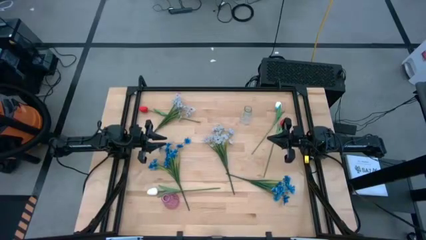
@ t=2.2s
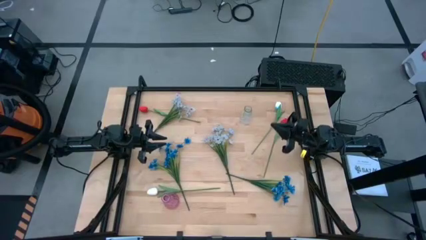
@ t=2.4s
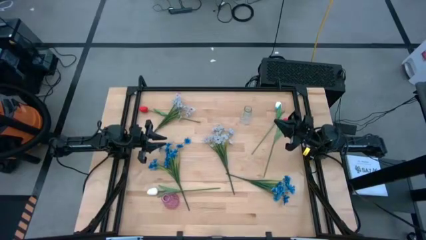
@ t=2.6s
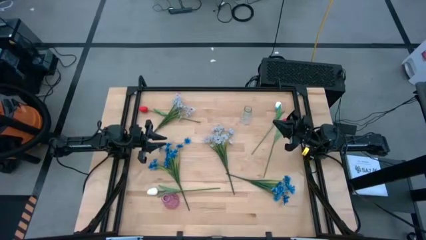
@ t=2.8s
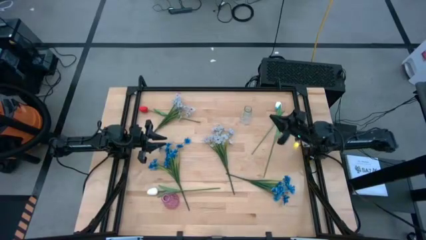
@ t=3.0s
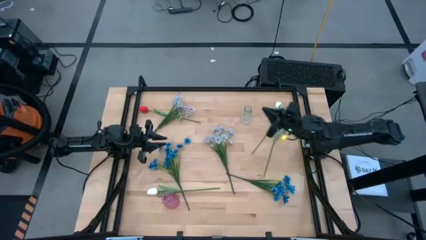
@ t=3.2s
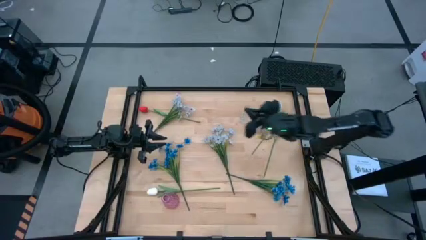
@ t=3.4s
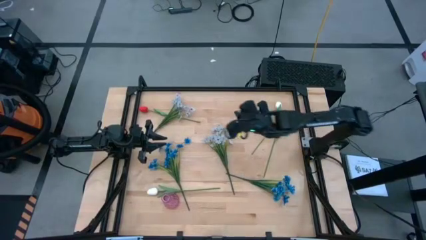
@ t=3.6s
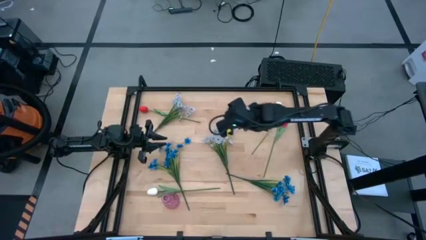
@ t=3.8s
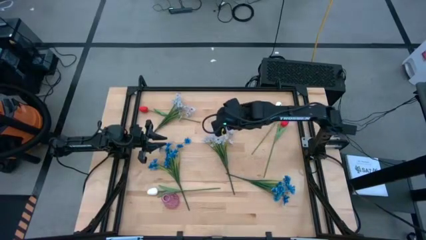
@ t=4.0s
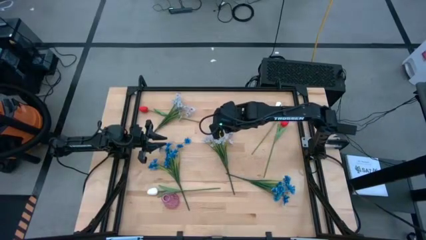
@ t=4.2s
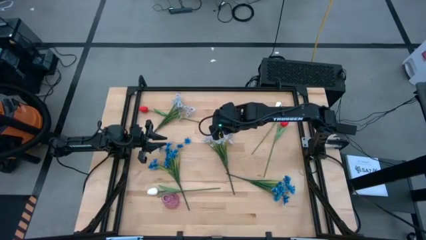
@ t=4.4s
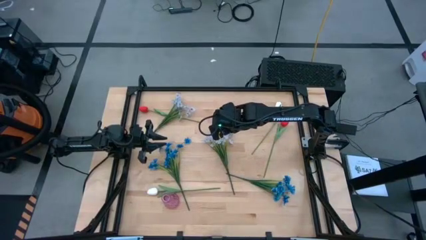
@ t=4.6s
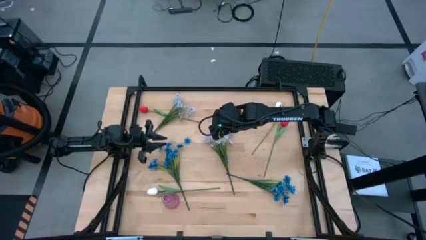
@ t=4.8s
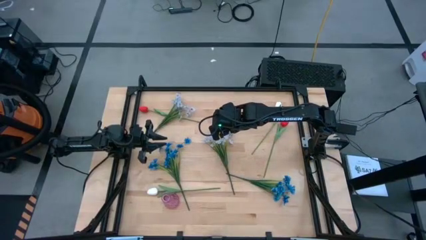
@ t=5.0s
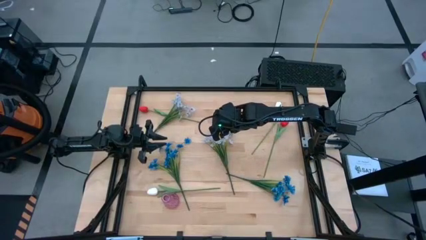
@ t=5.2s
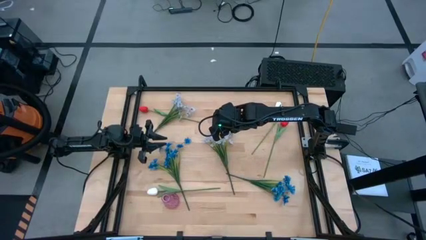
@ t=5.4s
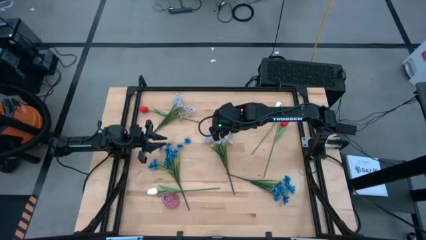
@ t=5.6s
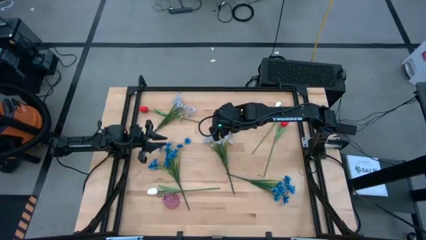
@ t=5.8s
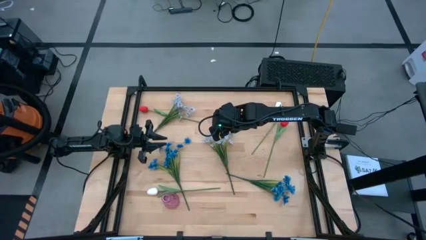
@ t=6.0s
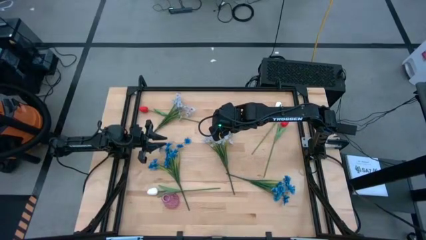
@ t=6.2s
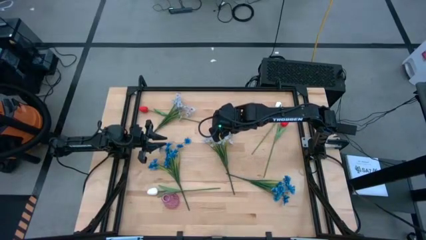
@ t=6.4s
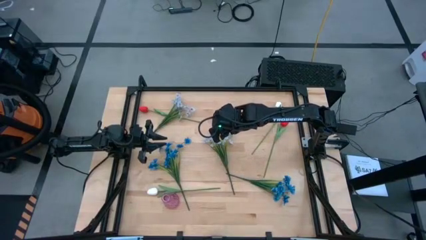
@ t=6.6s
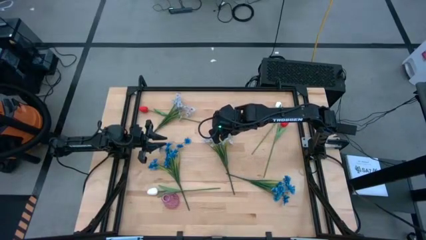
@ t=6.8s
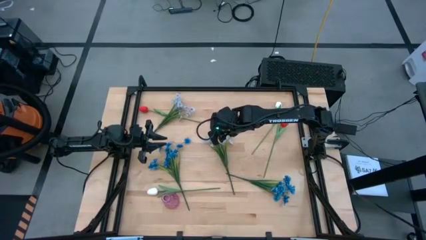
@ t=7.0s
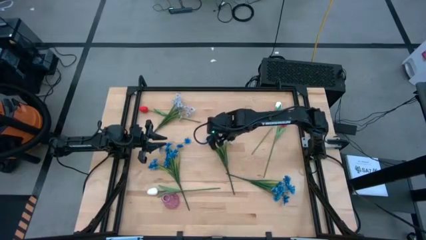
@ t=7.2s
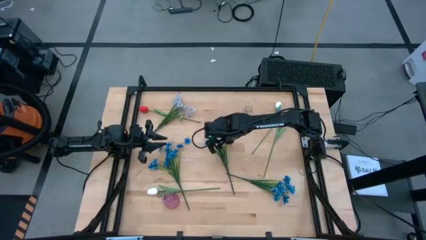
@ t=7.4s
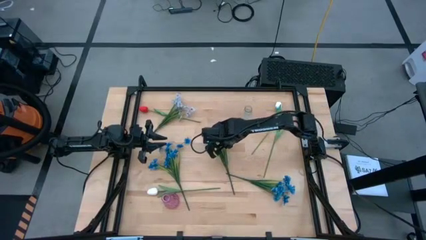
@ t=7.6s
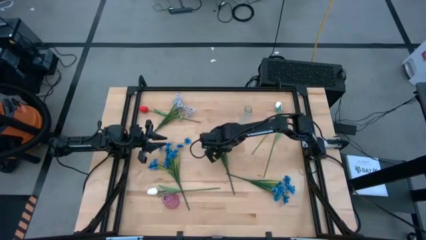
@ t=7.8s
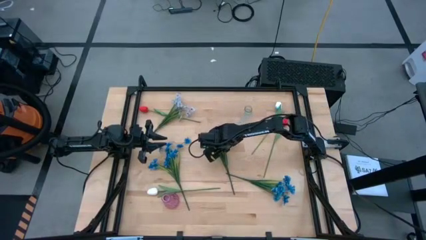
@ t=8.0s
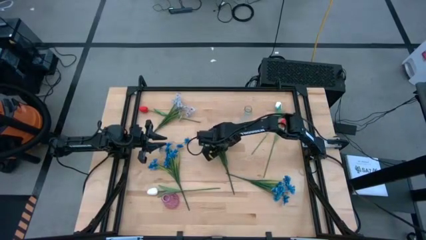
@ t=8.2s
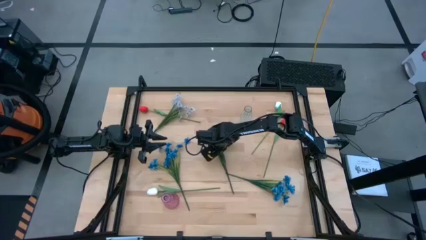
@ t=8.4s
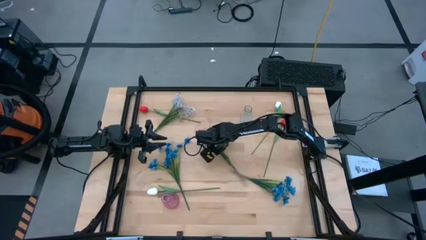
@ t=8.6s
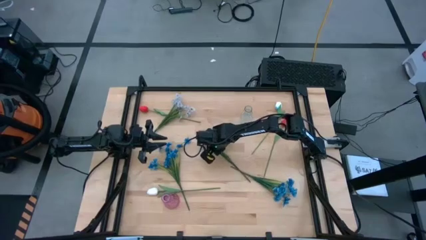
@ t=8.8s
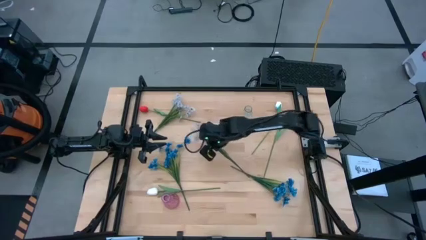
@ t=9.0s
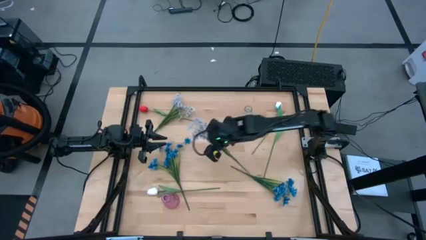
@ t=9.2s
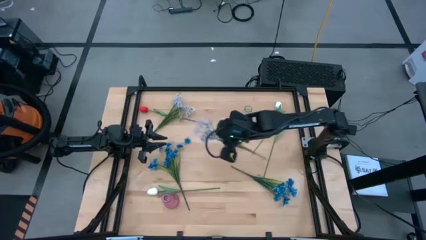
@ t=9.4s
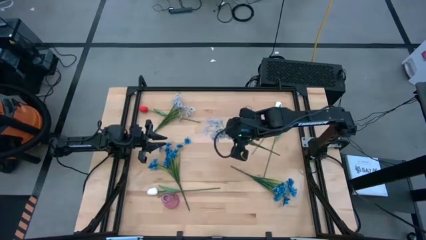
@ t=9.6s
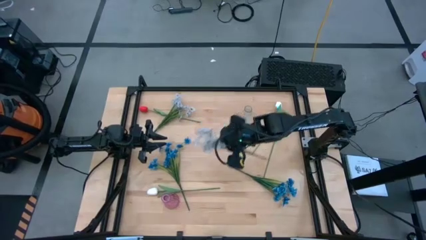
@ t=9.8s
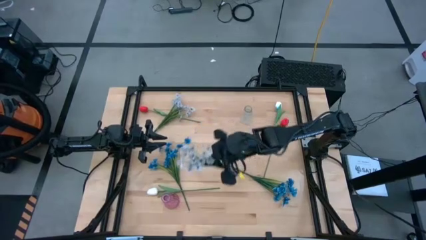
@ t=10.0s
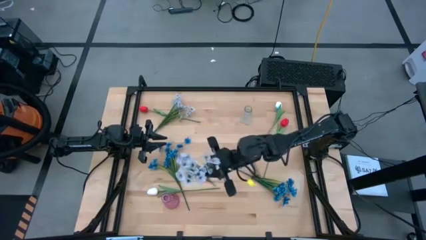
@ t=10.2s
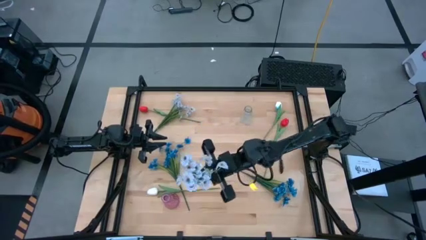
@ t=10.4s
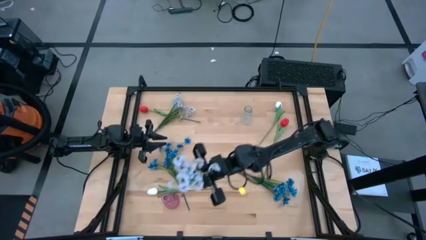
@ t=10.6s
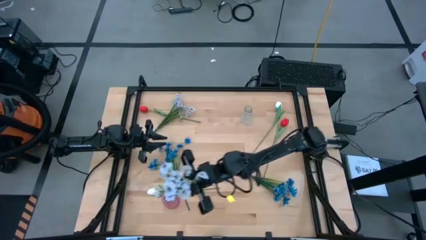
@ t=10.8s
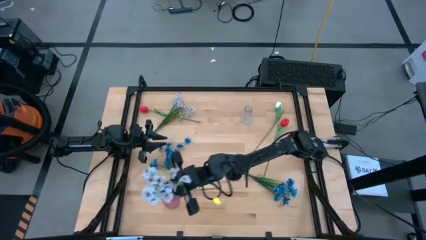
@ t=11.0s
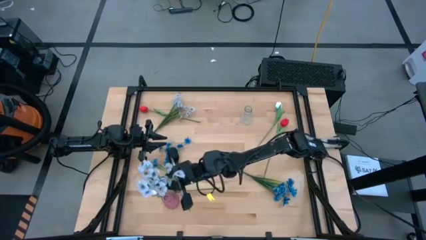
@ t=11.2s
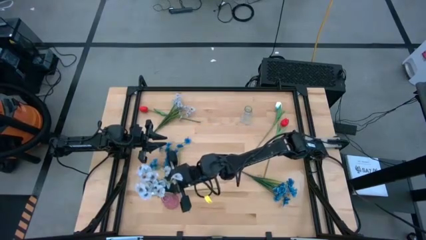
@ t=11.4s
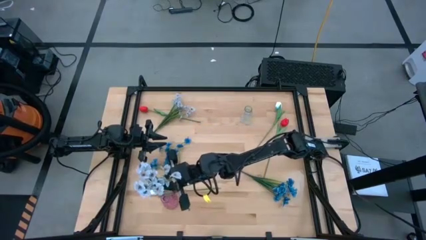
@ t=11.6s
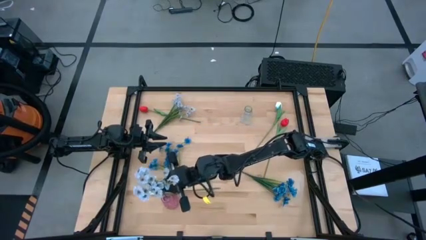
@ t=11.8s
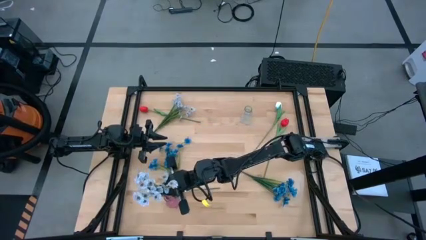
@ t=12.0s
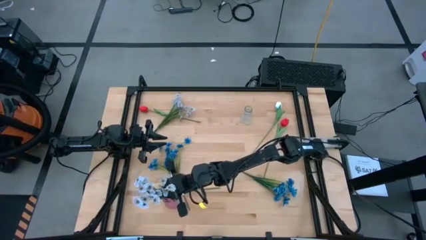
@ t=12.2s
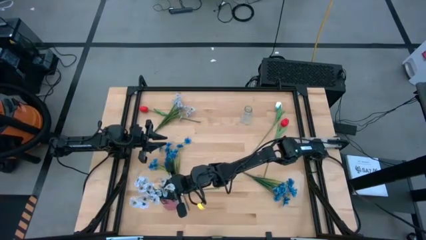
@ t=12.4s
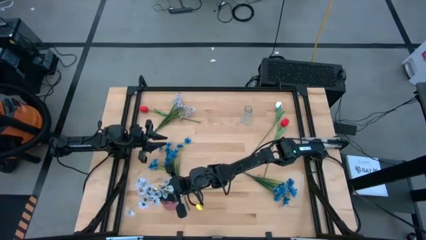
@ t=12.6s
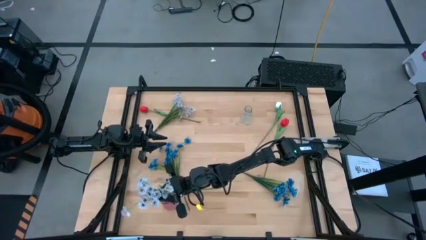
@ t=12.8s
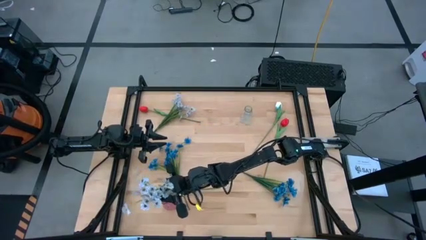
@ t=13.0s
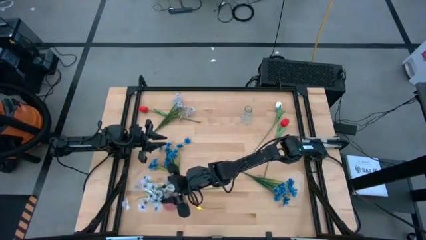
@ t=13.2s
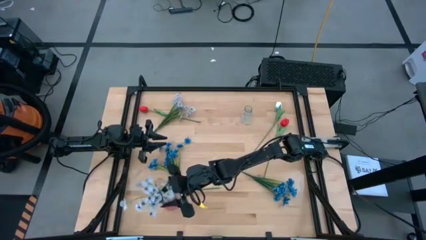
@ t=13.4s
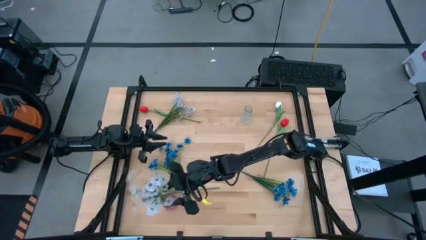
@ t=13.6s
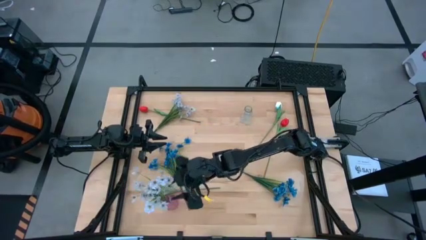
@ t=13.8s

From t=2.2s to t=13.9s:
Task: Sort flowers into vase by color
Put the bottom white flowers into the pink vase

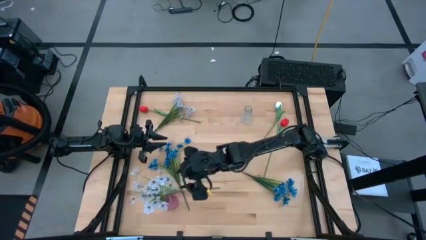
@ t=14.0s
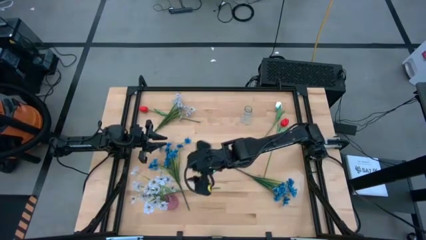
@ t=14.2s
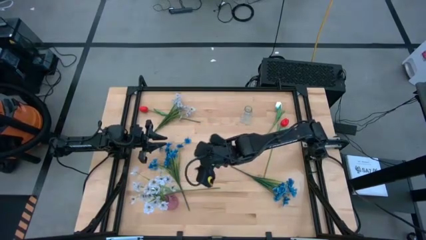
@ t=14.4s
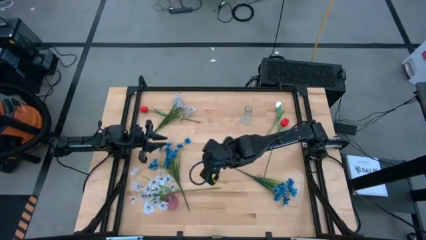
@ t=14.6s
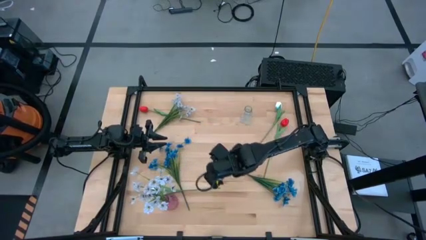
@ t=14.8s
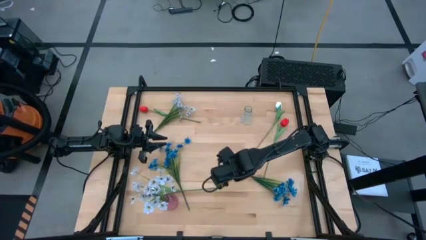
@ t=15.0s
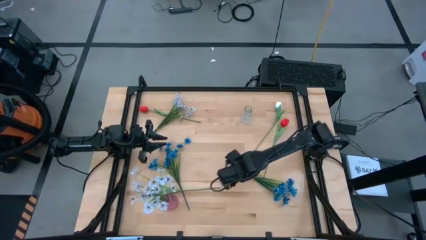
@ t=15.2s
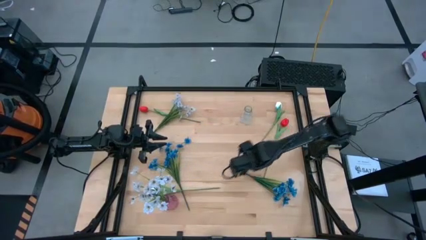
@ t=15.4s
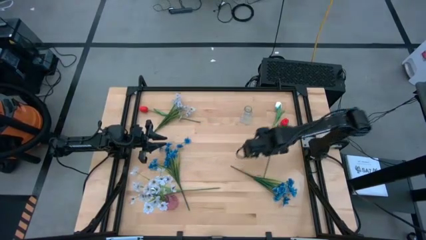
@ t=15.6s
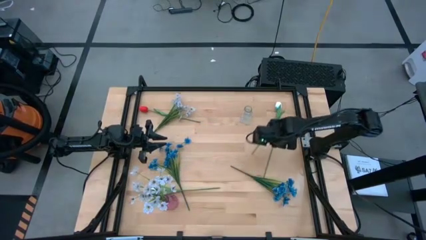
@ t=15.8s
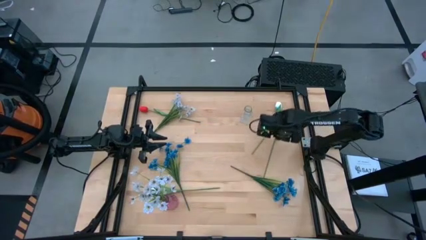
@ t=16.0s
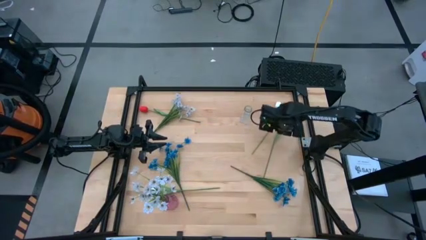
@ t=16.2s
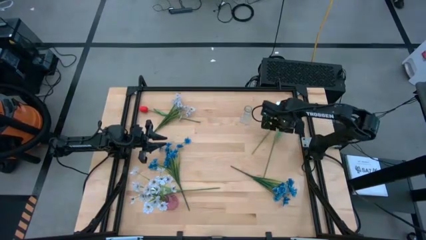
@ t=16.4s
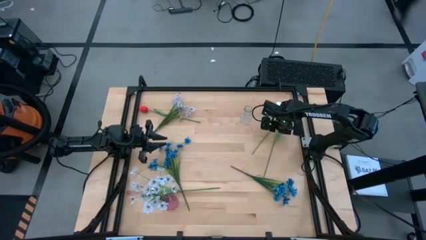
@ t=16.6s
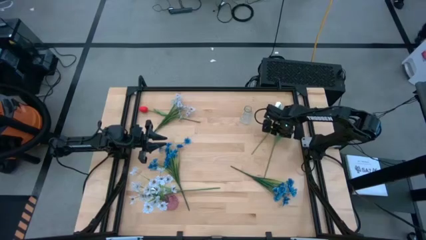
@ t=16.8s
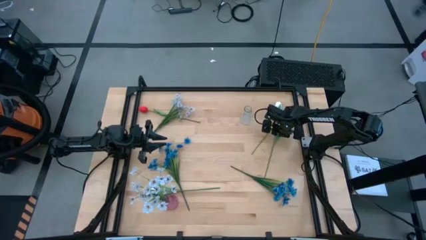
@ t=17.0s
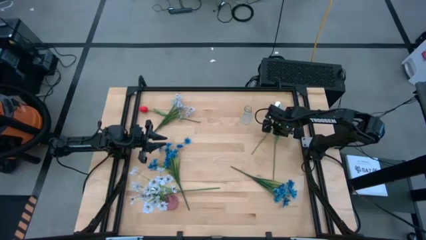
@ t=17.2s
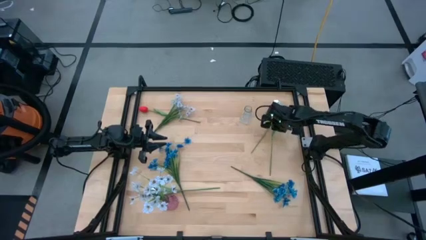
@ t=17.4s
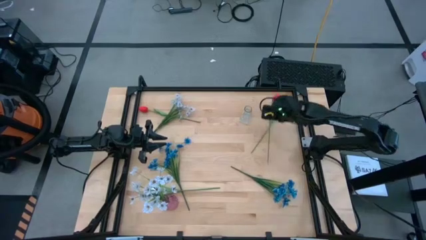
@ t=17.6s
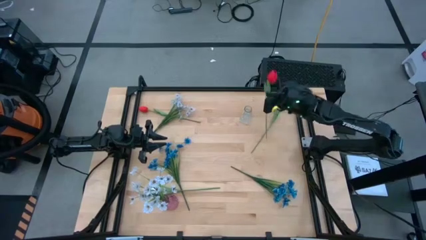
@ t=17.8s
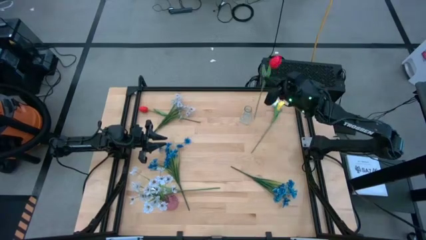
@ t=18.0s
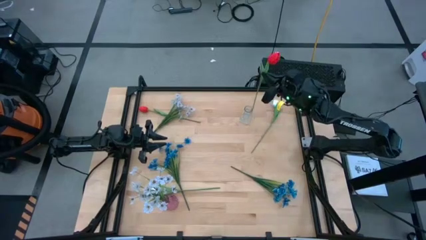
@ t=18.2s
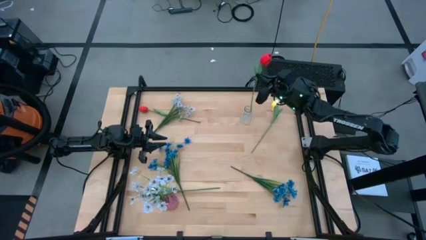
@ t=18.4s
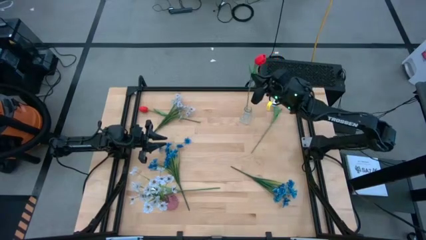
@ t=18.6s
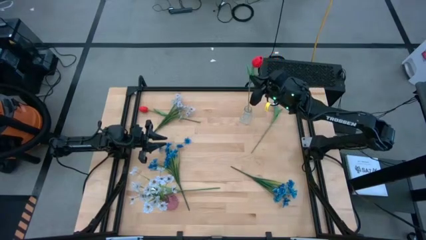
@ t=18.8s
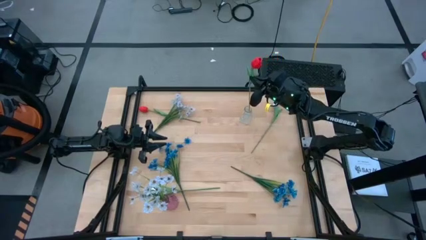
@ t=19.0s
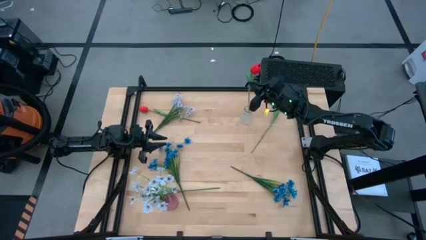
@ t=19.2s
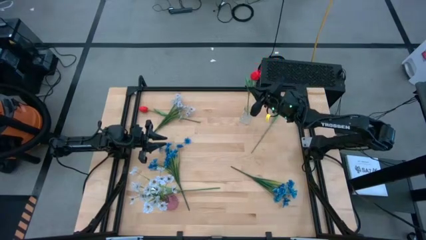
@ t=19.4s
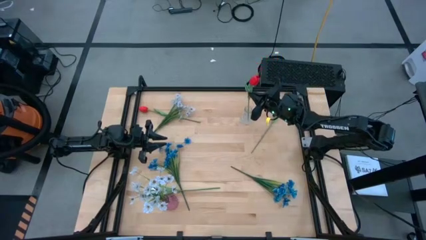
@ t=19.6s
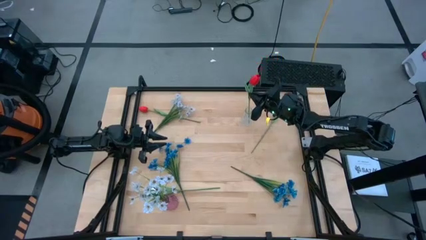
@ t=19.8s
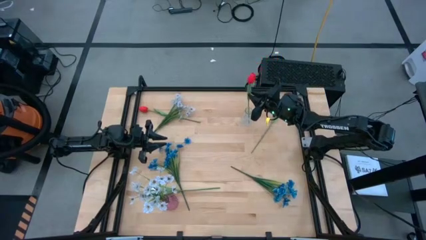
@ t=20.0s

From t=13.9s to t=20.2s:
Put the right red flowers into the transparent vase
